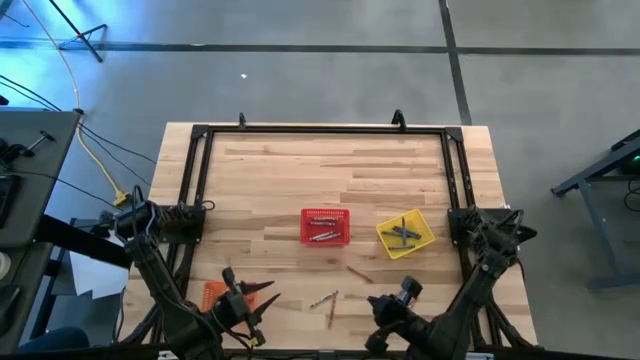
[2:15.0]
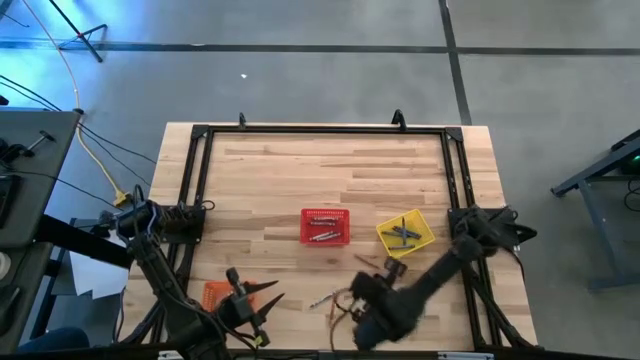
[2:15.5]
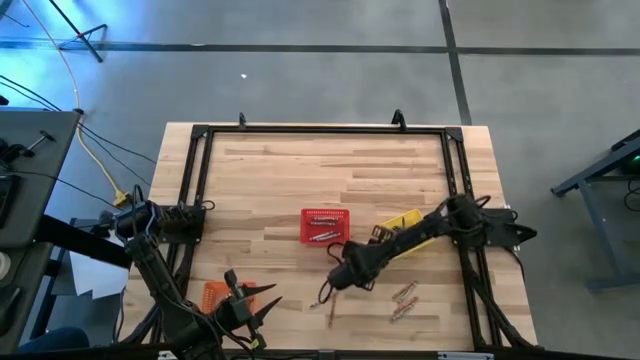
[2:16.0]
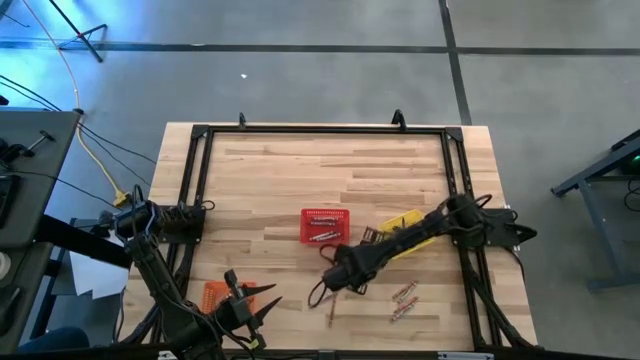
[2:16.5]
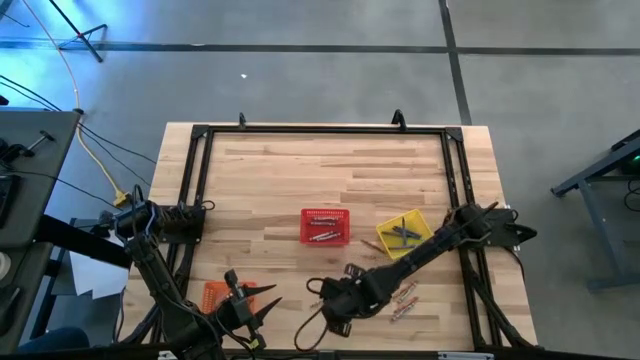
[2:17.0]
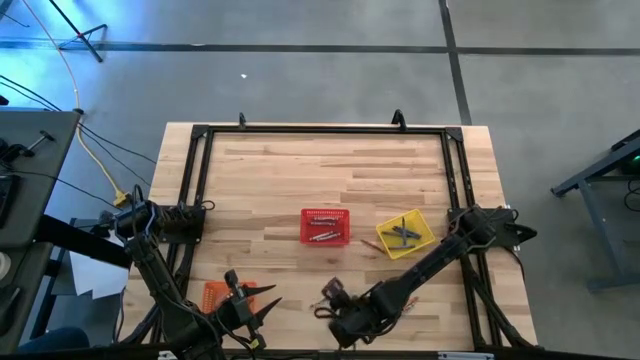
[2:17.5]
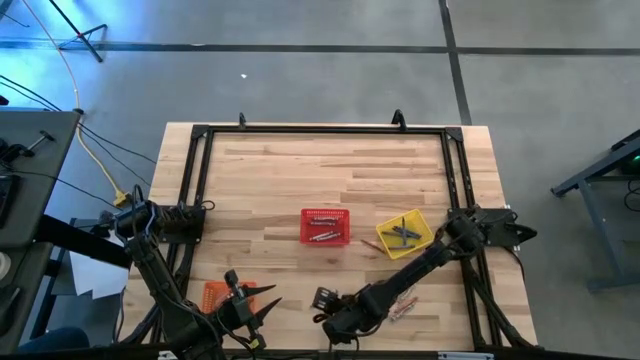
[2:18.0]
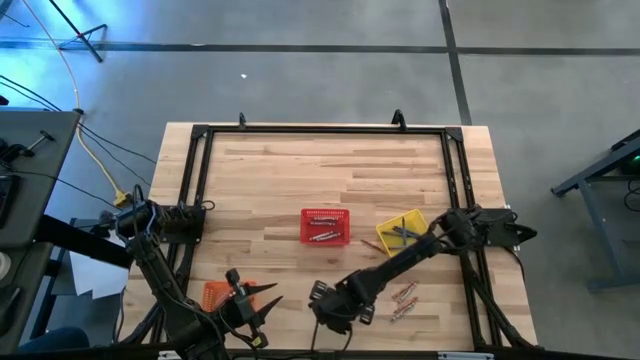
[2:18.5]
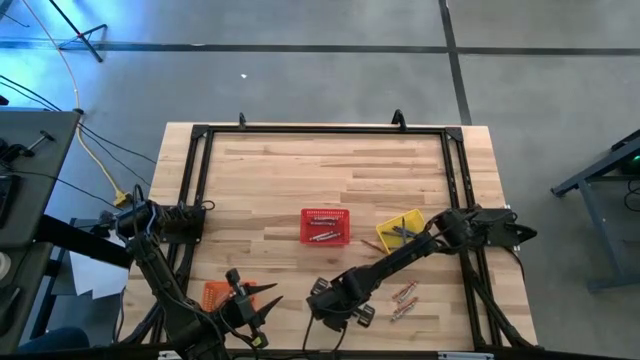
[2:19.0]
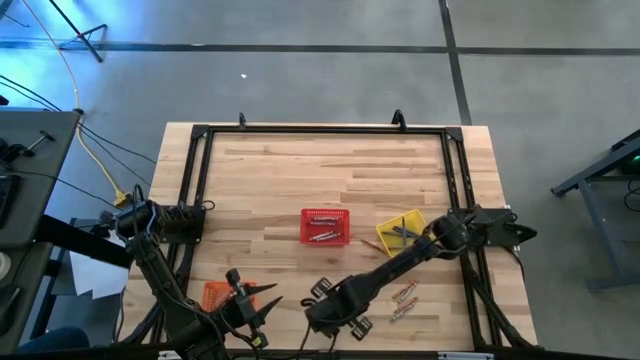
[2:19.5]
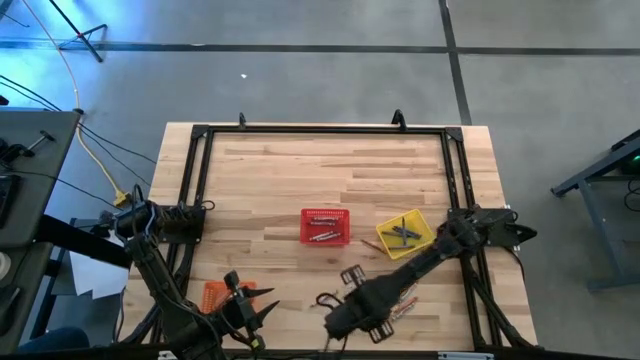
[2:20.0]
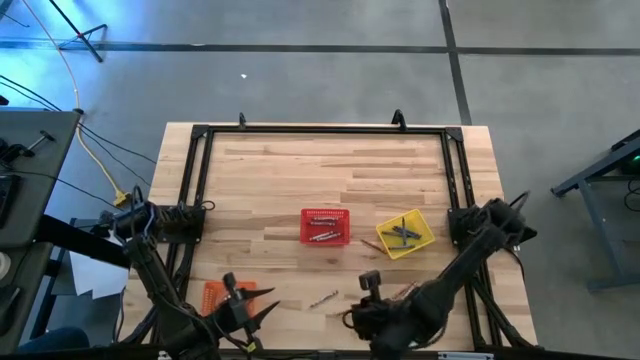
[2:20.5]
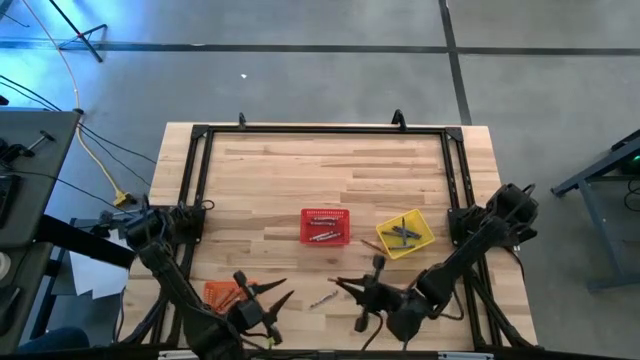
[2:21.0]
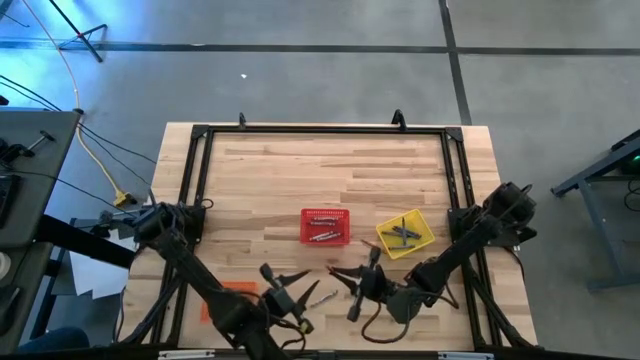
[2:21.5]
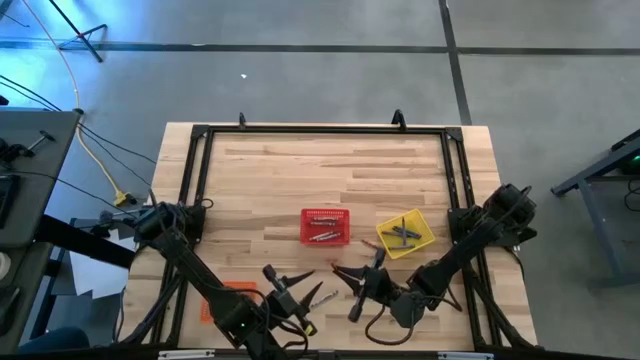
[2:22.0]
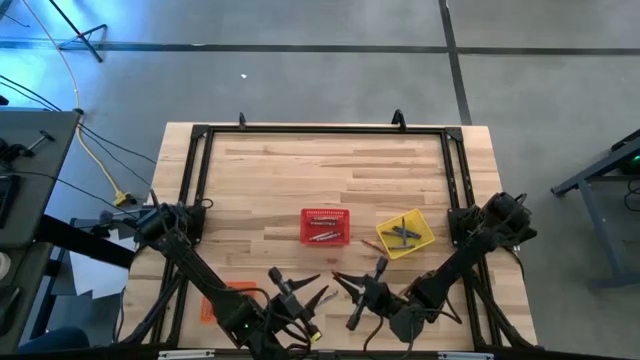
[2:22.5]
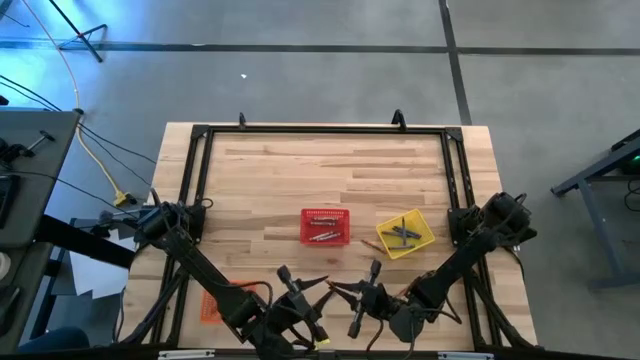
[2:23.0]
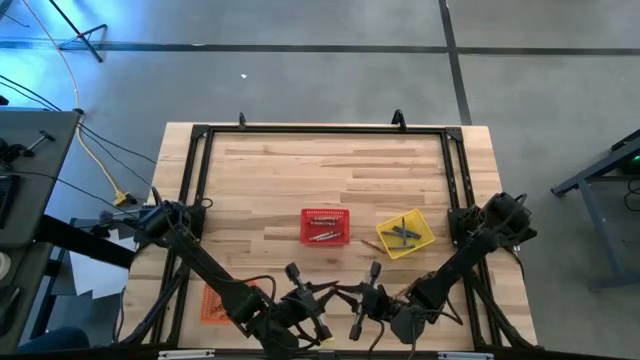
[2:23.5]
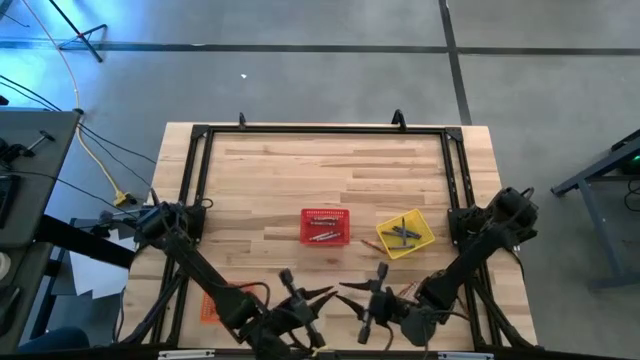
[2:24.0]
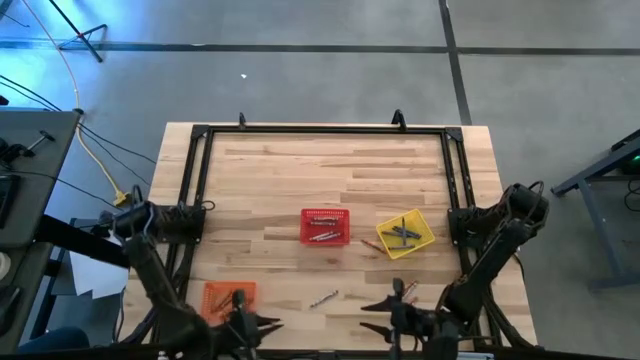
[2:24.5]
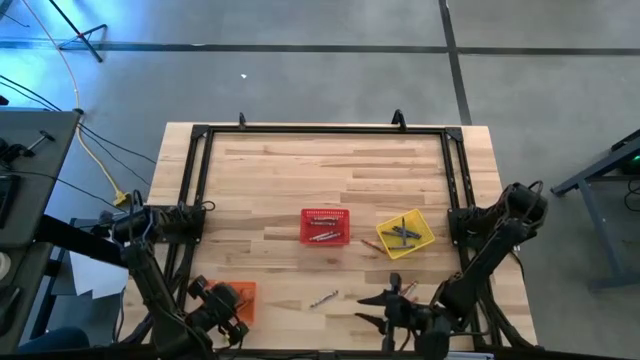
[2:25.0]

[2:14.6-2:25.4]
Task: Sort crayons
Put the orange crayon into the orange bin

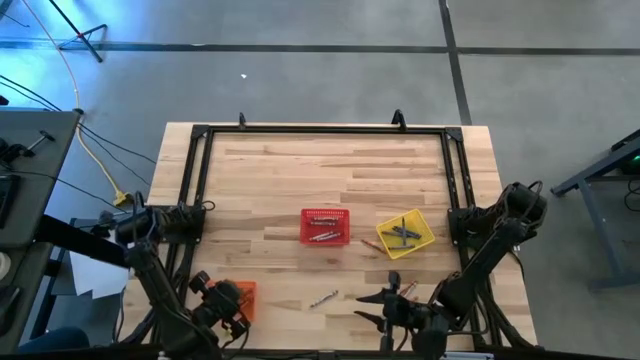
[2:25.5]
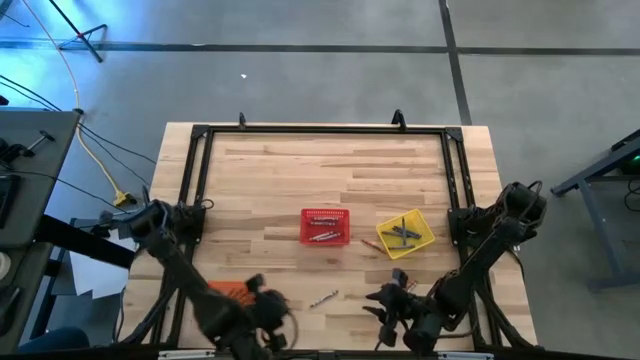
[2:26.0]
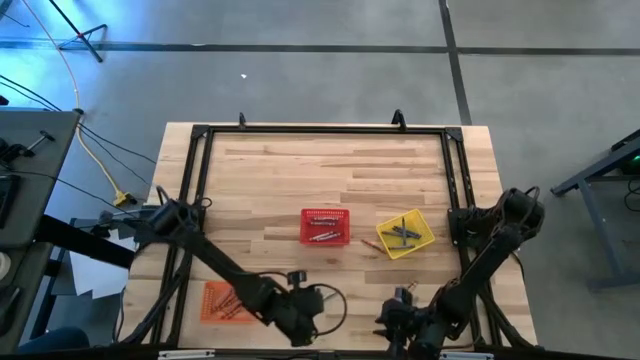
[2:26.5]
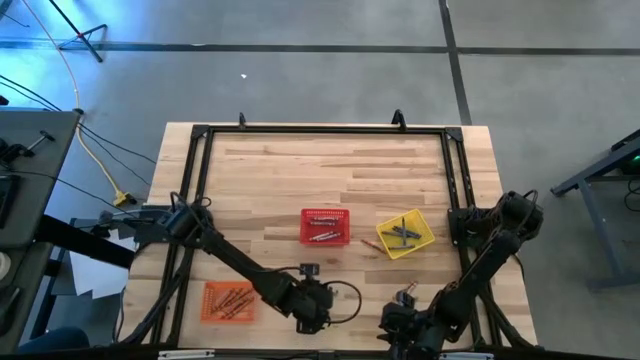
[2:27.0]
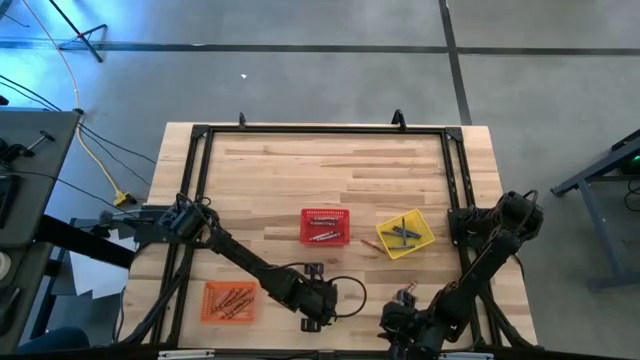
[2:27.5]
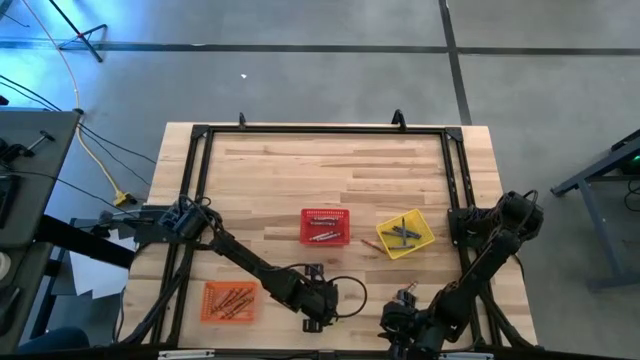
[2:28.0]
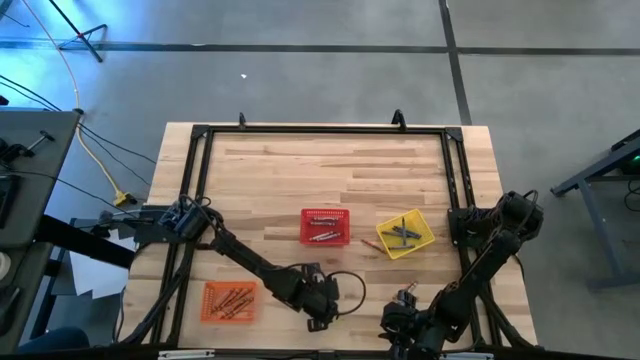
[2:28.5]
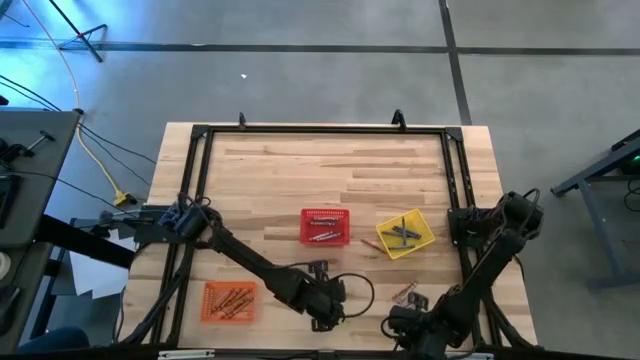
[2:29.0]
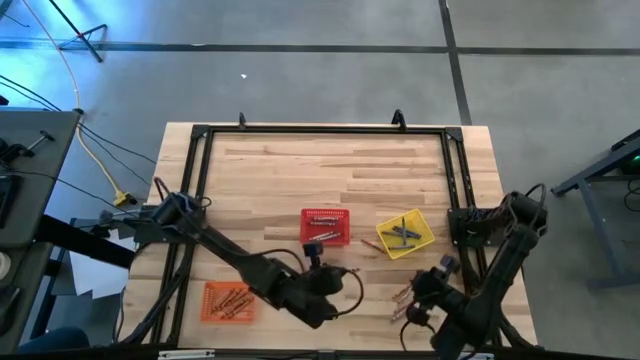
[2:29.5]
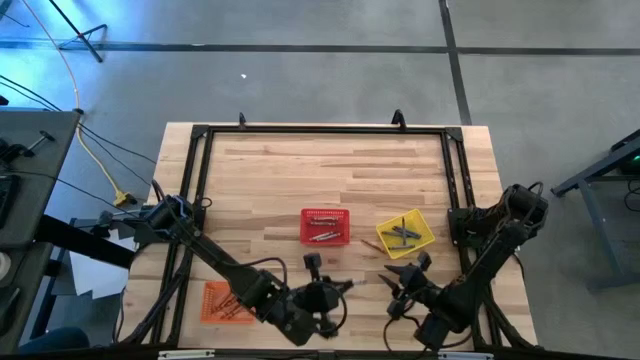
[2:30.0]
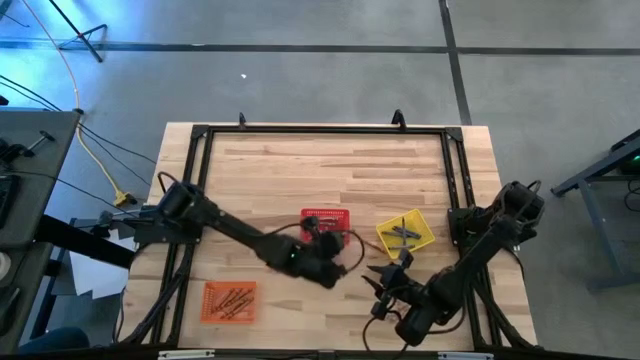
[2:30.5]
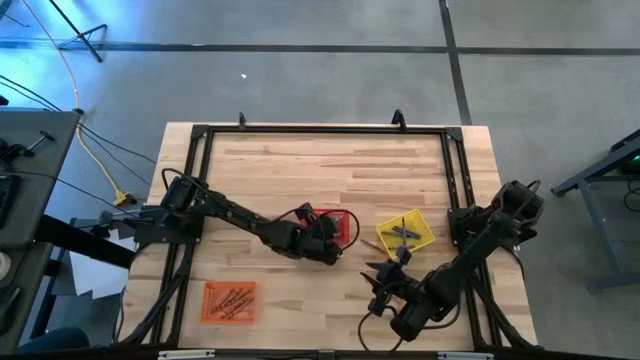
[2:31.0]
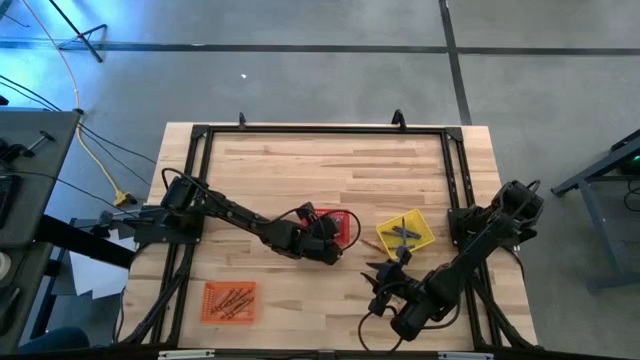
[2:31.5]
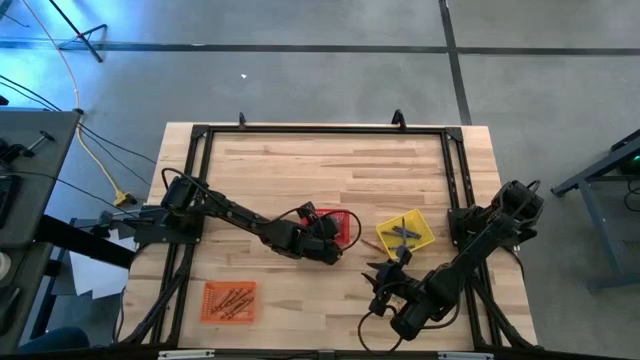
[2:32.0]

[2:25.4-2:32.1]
Put the gray crayon into the red bin

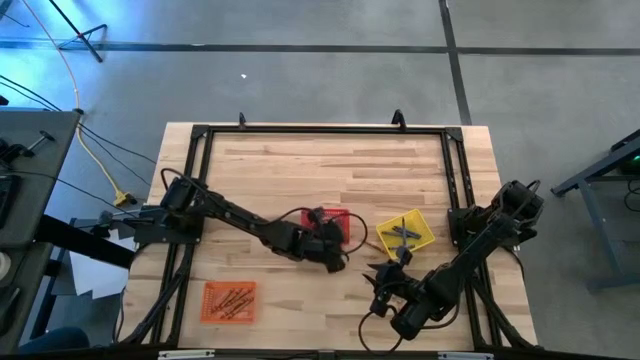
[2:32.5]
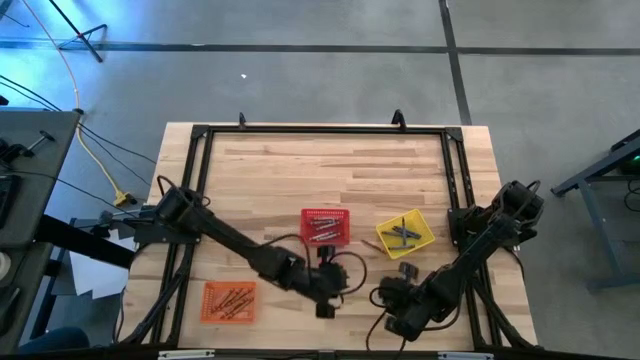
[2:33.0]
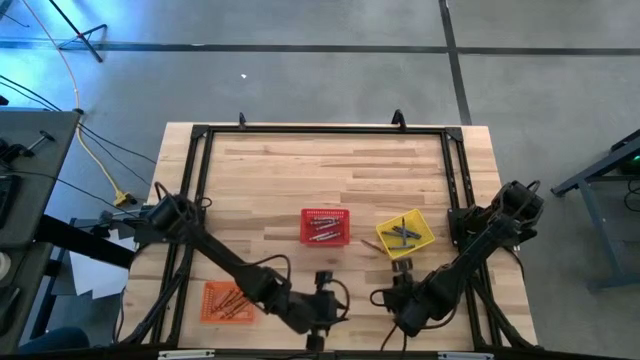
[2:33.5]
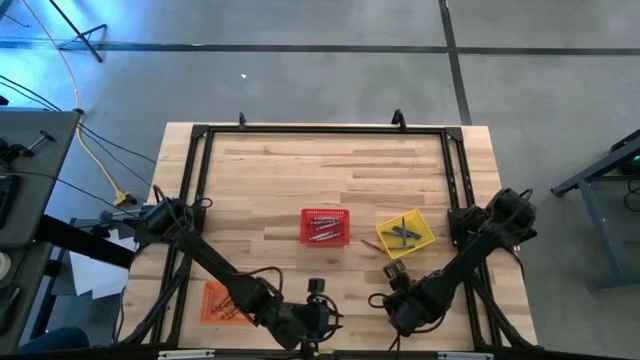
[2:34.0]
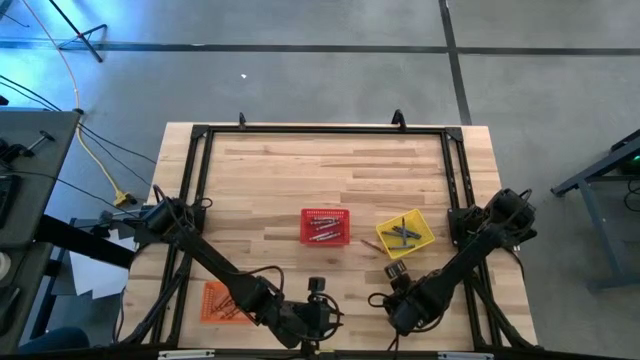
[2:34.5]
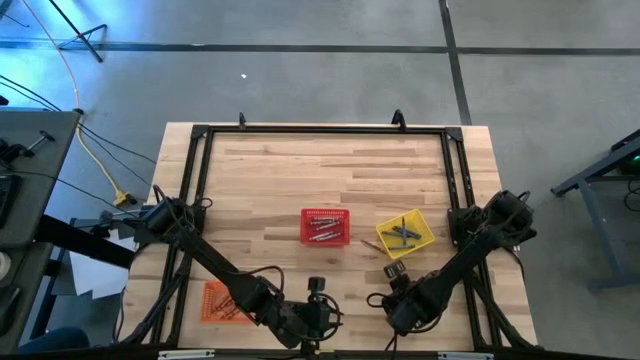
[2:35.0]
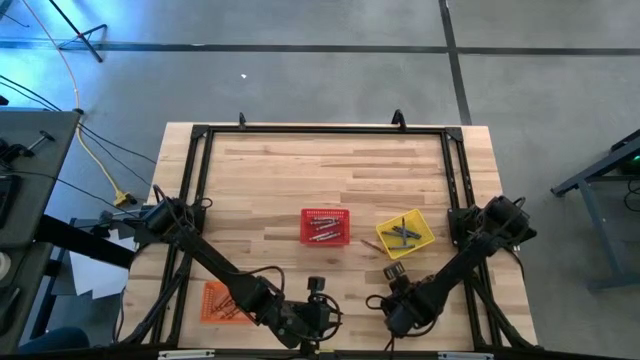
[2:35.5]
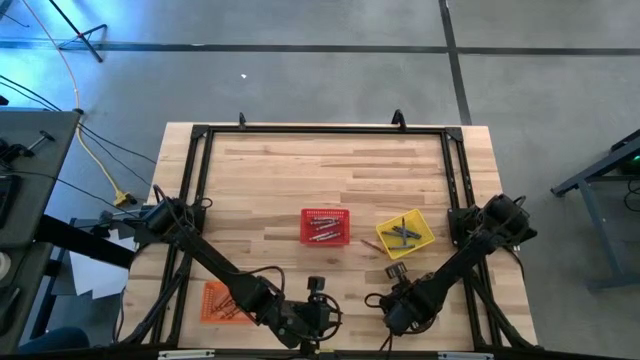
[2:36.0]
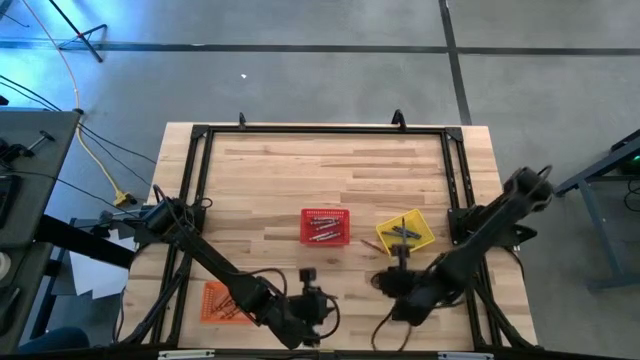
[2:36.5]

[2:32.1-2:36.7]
Put the orange crayon into orange bin
